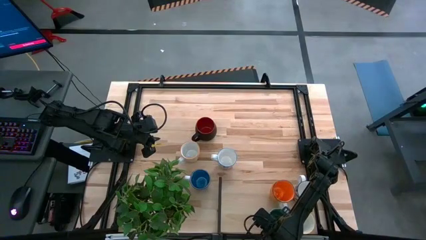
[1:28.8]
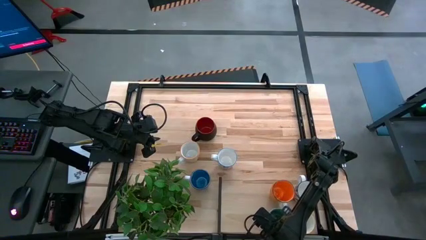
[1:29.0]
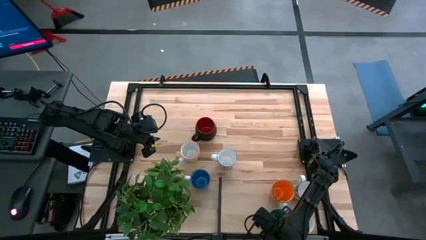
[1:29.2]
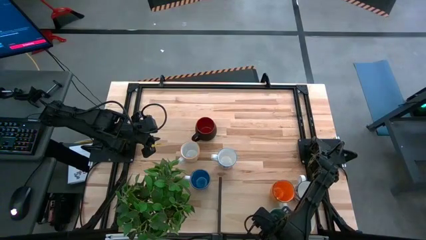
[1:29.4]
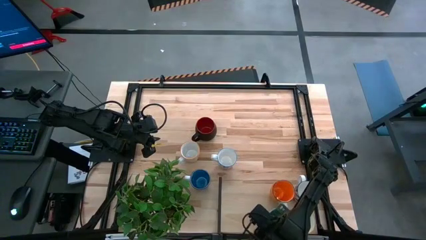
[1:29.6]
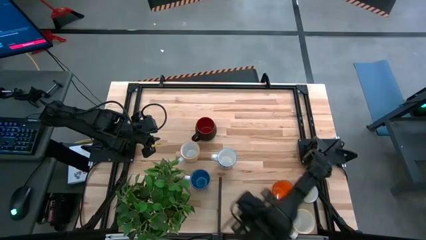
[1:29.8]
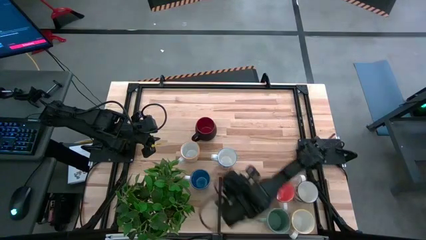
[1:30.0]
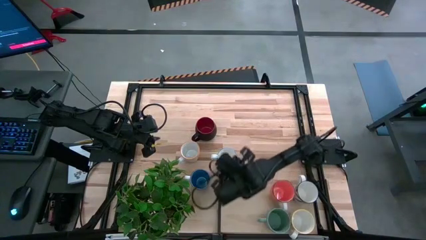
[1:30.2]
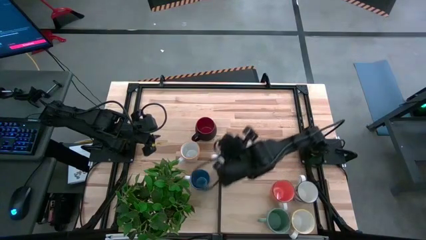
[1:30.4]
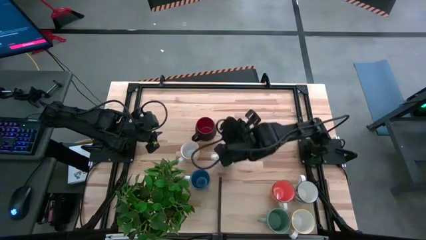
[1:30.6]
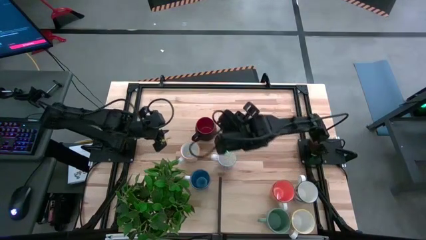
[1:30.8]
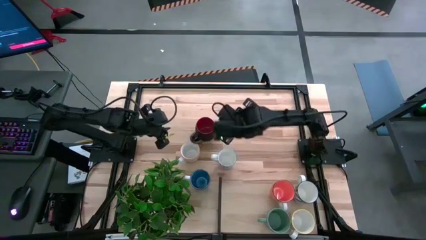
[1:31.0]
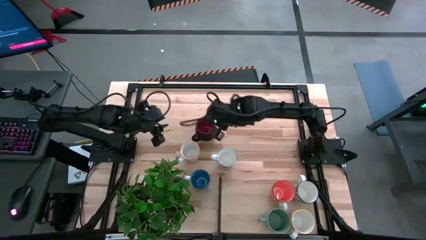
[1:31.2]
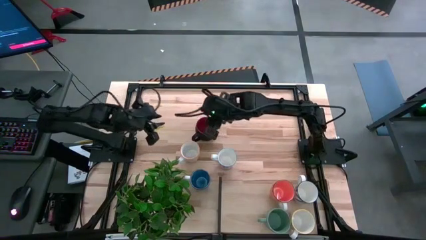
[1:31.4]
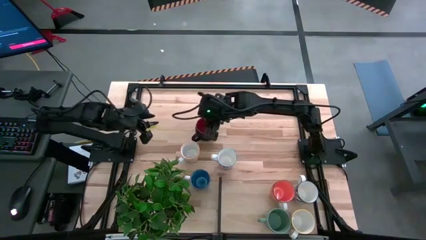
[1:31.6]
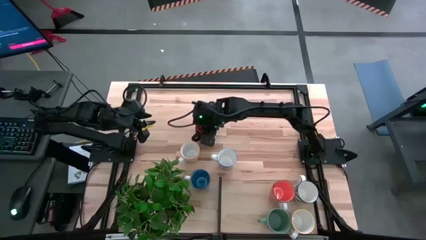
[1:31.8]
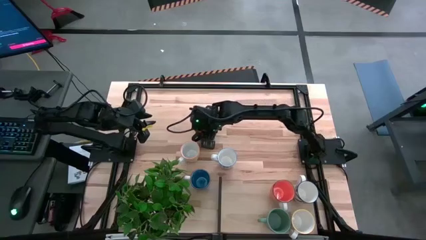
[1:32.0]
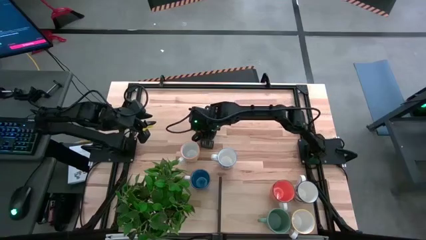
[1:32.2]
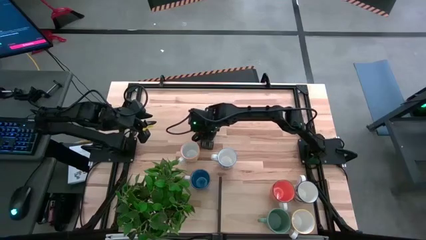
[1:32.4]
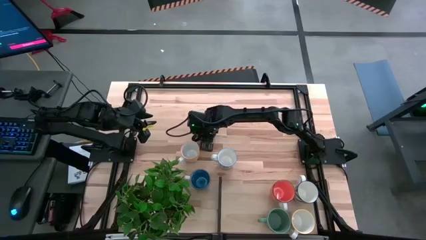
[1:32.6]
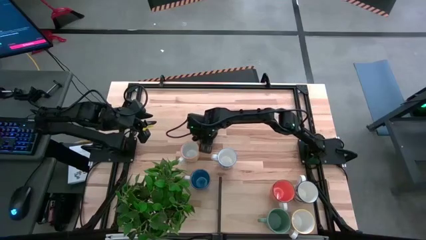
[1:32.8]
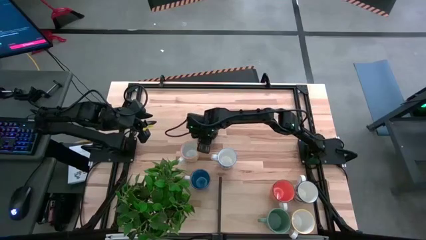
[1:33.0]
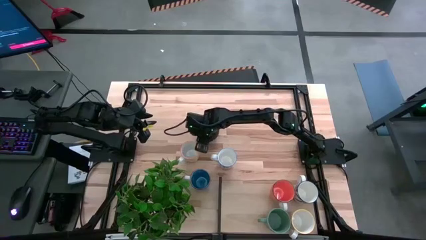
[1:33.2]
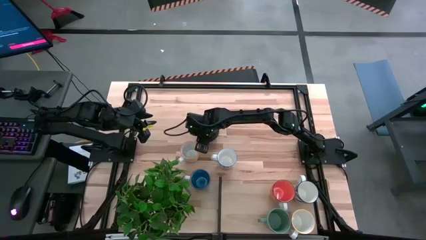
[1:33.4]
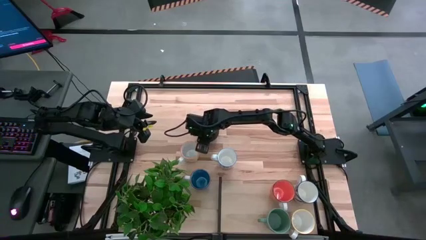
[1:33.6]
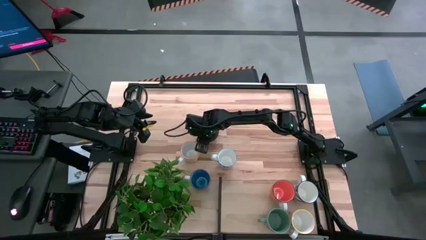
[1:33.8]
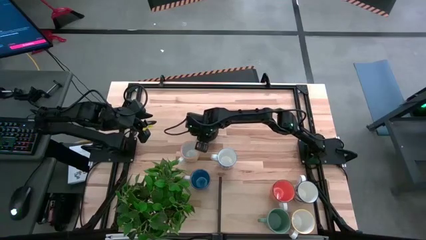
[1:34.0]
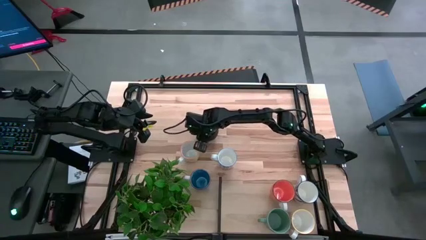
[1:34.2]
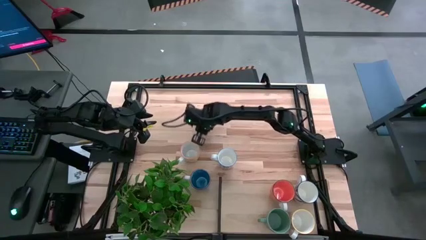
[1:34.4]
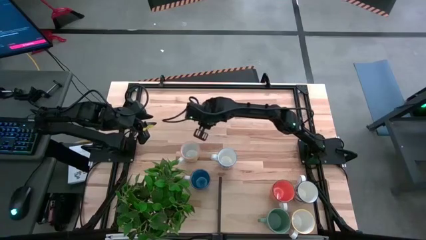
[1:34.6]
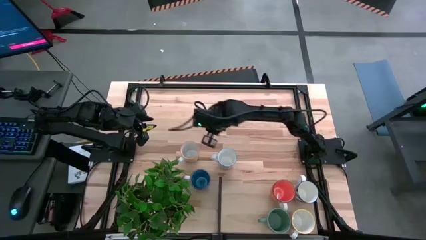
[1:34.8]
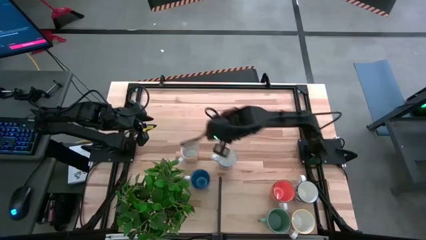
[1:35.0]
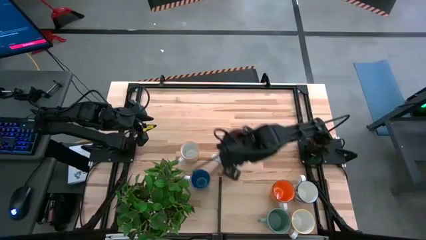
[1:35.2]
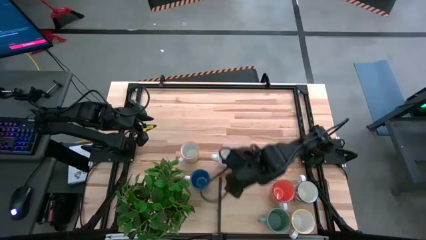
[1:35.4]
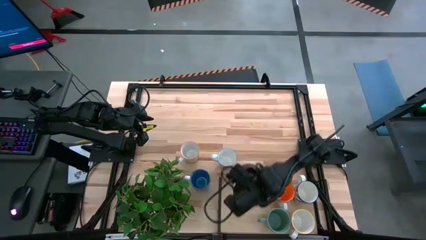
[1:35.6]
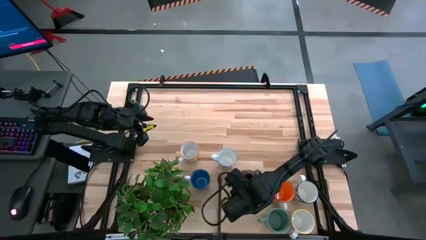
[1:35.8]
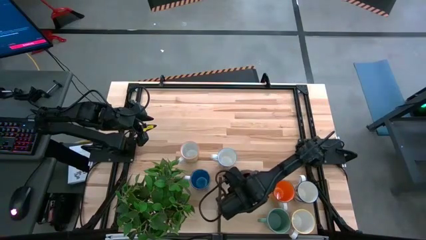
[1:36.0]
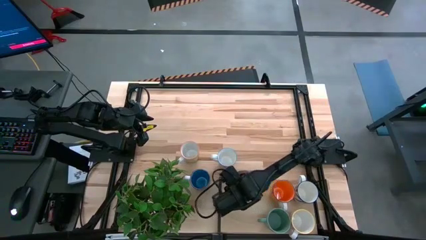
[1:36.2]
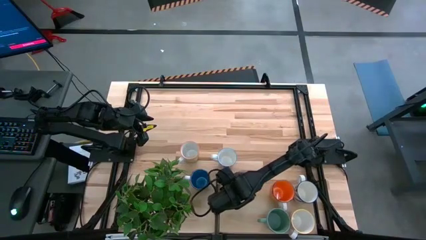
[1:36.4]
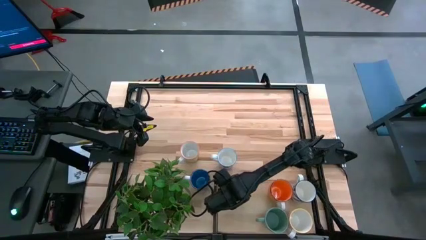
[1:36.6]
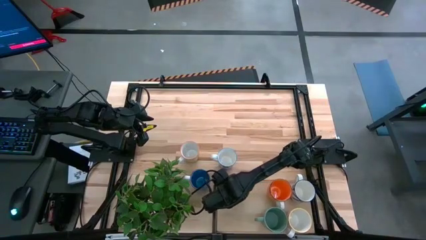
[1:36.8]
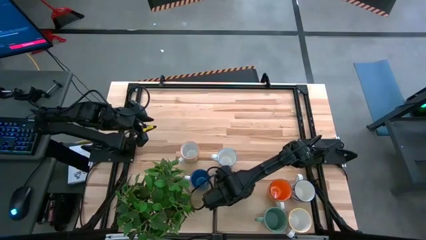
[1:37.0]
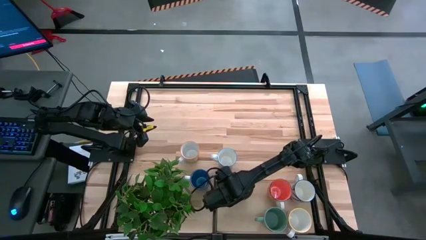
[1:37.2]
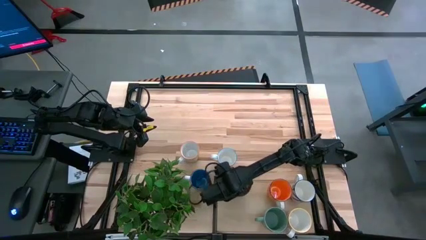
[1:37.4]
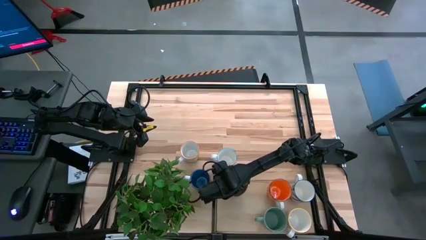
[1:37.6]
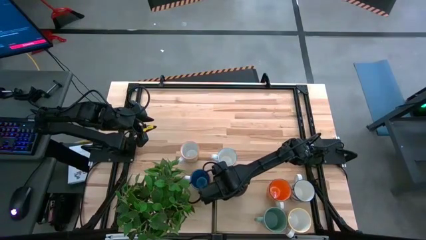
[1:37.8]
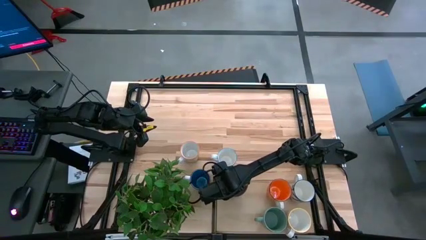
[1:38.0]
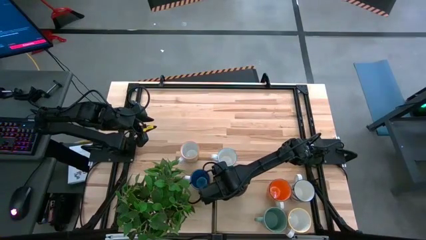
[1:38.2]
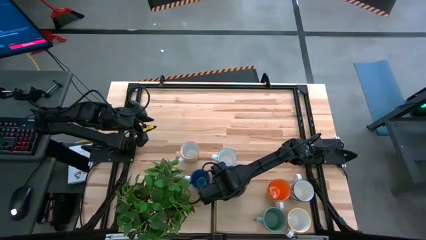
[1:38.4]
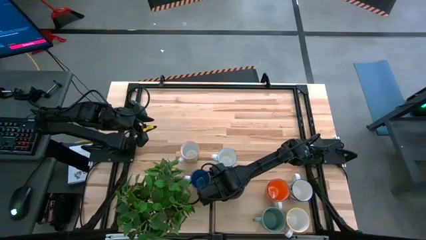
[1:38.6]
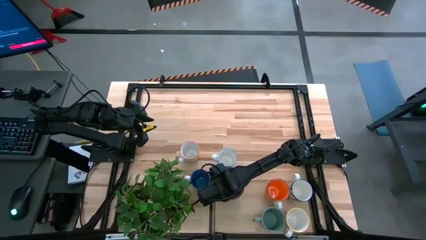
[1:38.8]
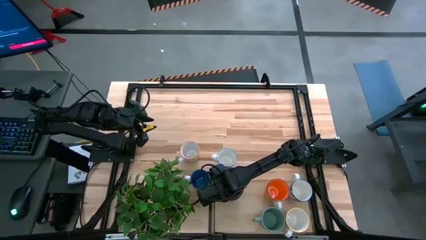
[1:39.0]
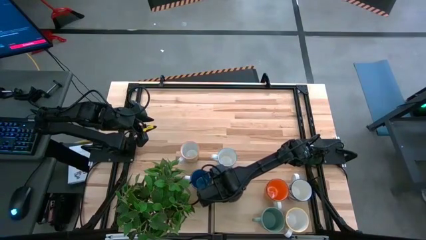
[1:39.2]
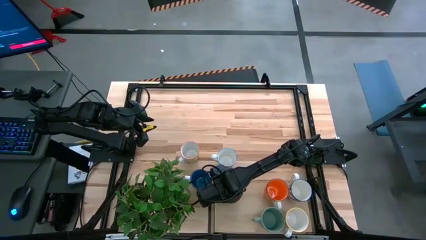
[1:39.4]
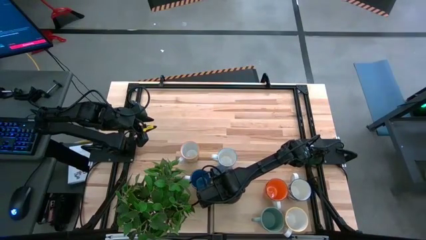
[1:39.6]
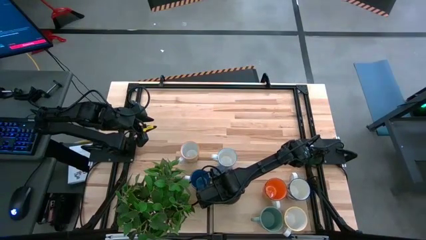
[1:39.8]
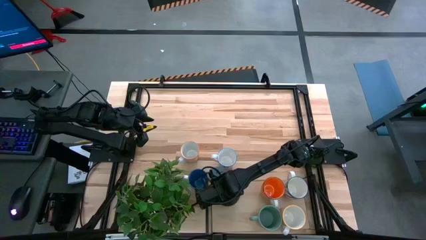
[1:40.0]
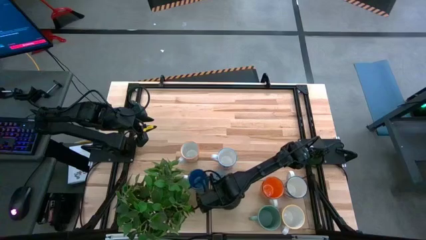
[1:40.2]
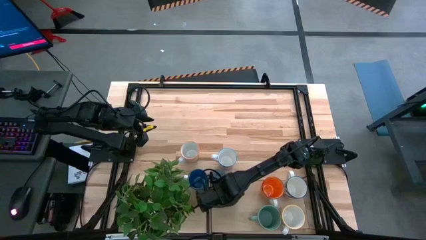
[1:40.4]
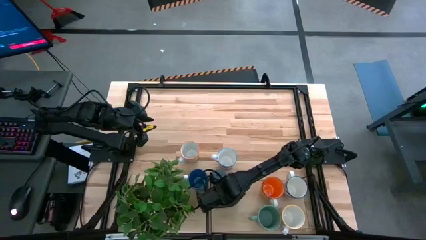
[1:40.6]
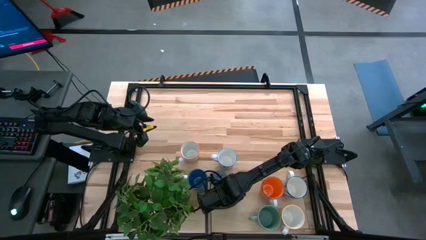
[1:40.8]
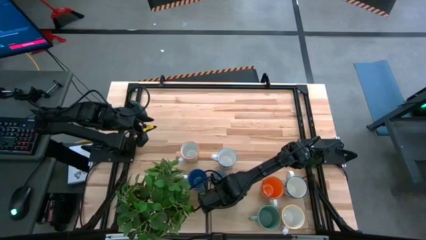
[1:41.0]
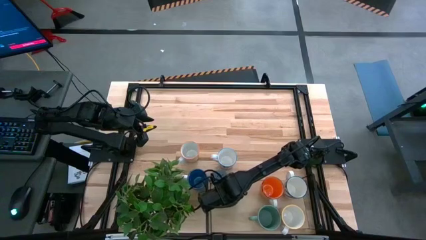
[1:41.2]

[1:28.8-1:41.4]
Task: Place coffee mugs
Put the black mug on the shelf

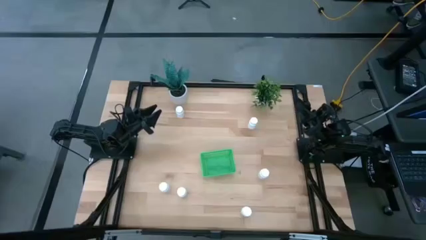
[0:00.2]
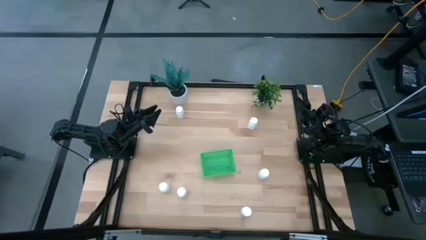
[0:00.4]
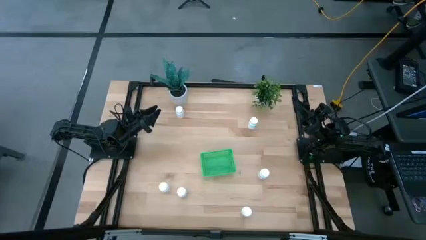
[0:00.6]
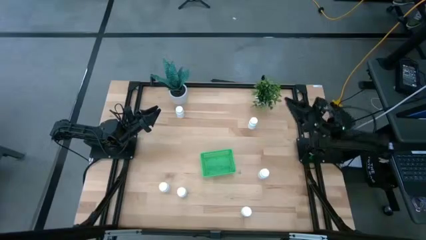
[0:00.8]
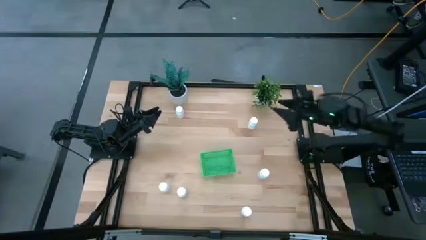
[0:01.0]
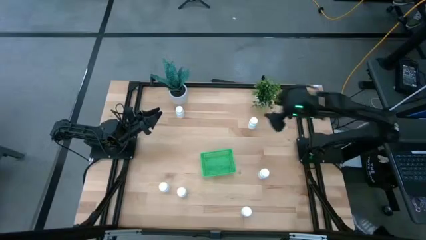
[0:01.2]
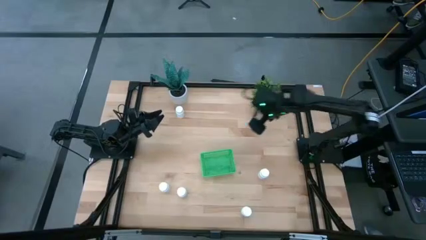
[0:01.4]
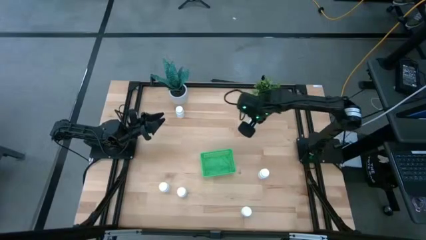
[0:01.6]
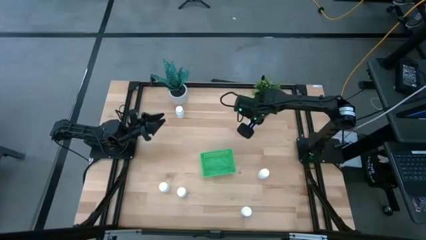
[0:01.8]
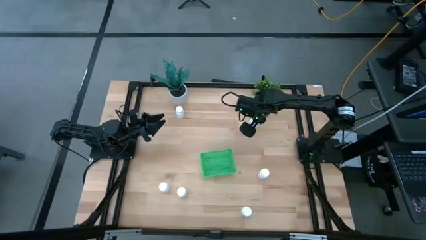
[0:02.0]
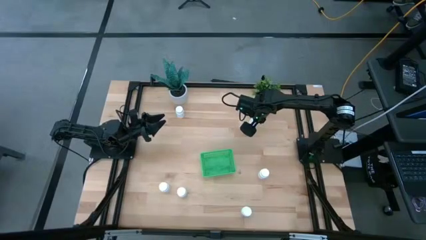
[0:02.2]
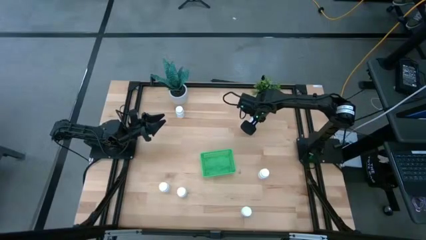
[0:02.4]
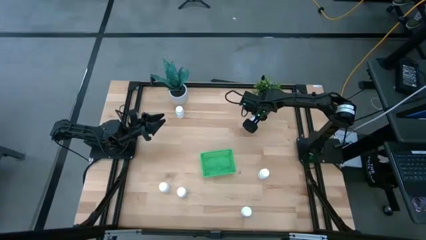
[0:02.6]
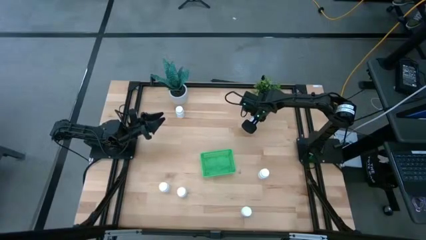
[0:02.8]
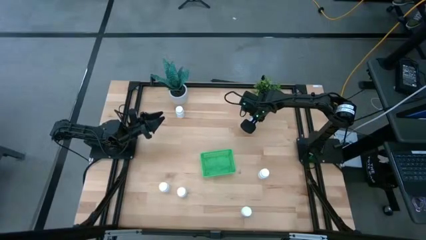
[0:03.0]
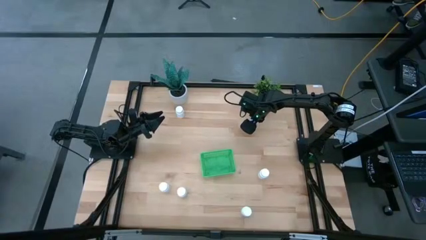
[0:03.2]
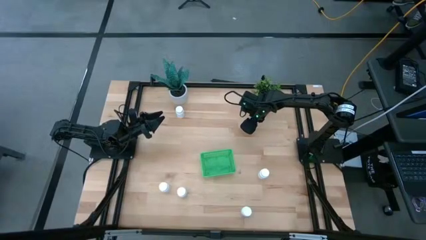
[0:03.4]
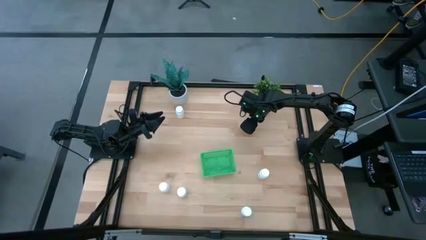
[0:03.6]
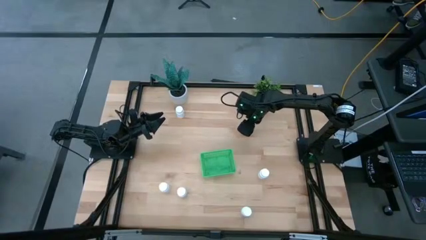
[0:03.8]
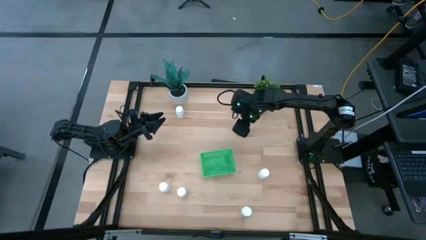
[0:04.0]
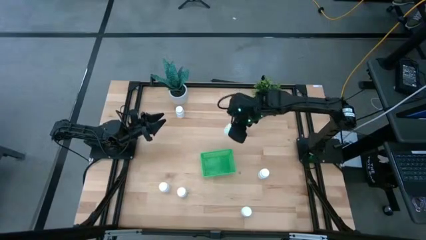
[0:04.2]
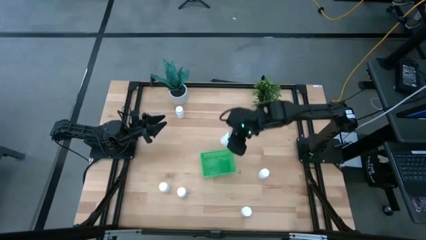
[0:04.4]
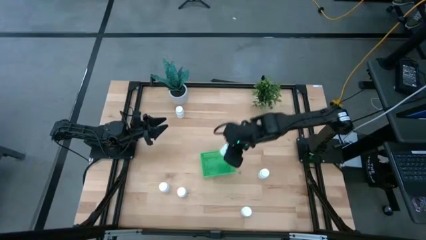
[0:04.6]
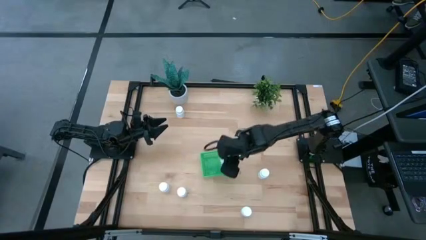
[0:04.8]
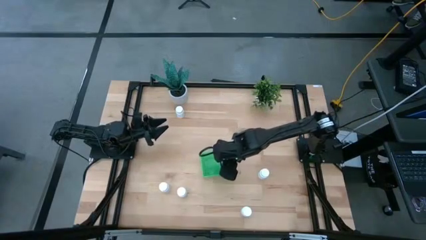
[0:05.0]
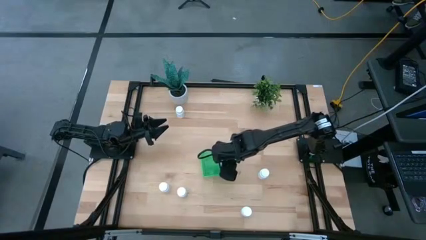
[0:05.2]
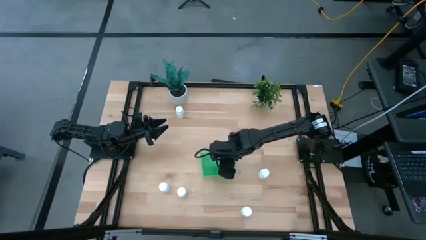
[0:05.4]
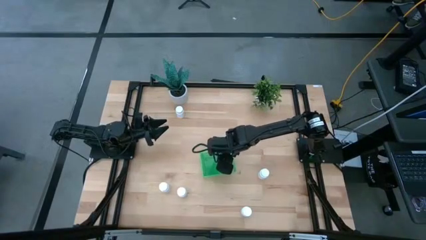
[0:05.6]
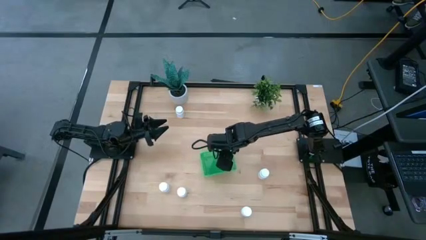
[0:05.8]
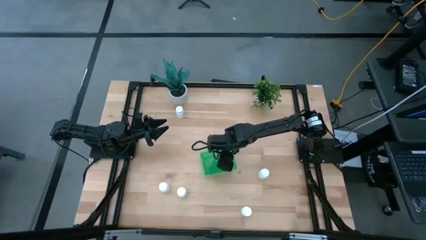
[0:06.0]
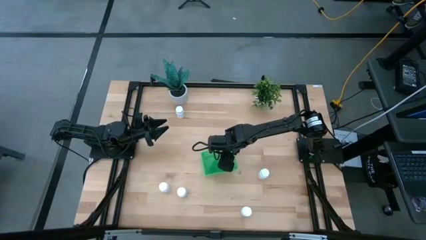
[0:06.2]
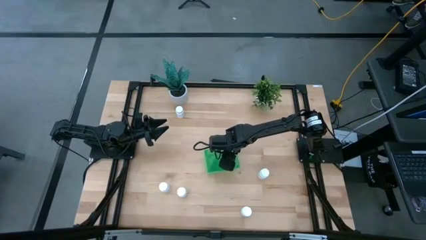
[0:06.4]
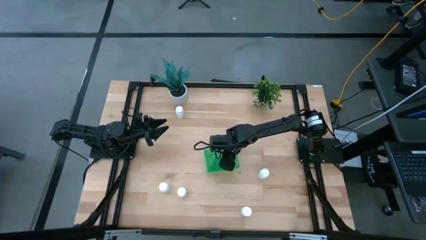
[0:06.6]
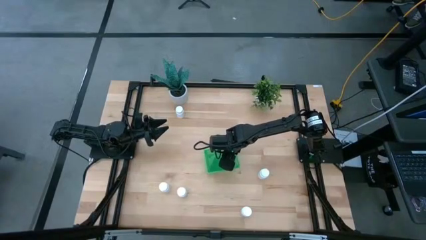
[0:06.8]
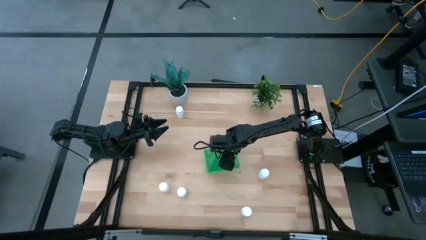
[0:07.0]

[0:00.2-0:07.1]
Task: Pick and place pill bottles into a basket
Put the white pill bottle into the green basket
